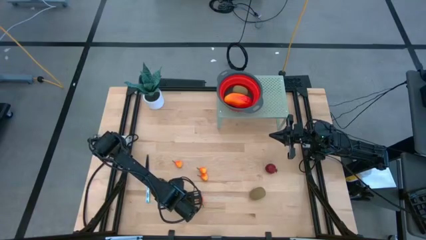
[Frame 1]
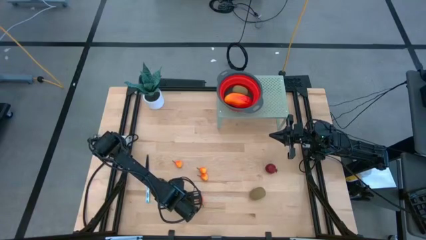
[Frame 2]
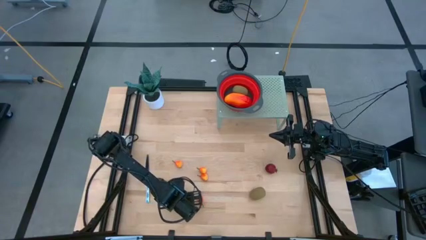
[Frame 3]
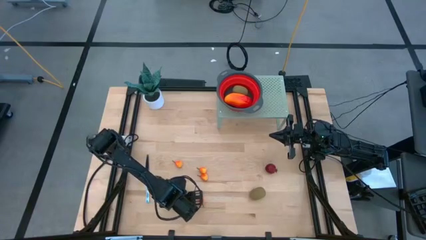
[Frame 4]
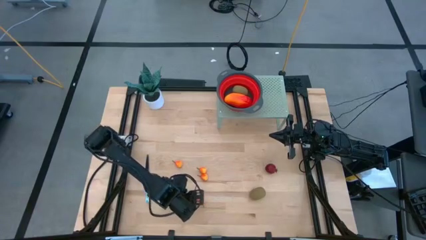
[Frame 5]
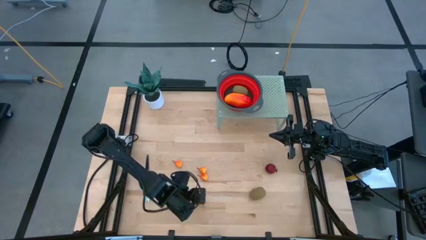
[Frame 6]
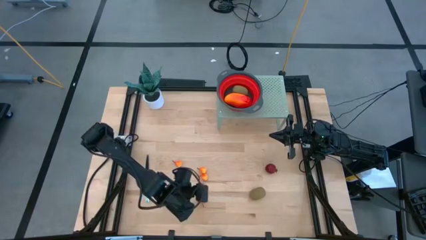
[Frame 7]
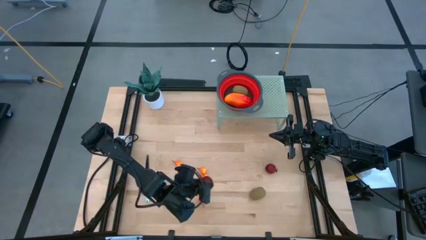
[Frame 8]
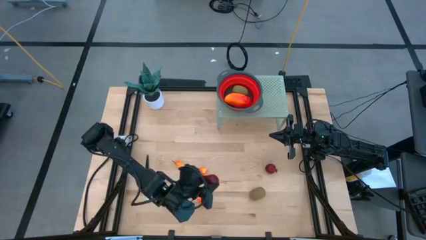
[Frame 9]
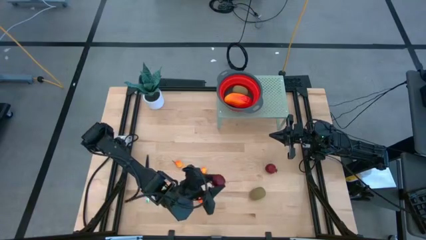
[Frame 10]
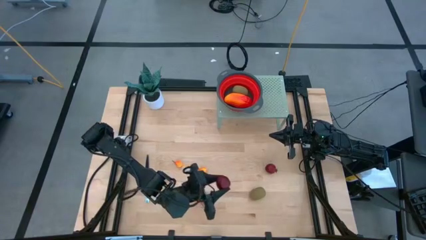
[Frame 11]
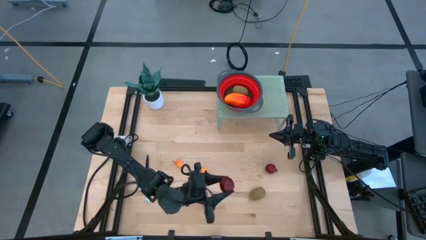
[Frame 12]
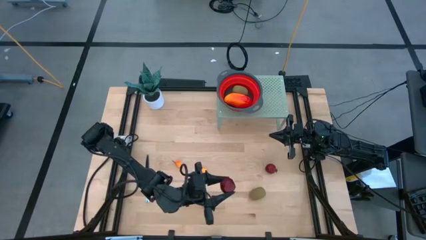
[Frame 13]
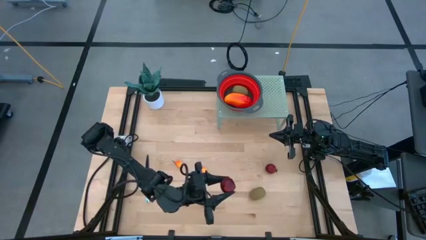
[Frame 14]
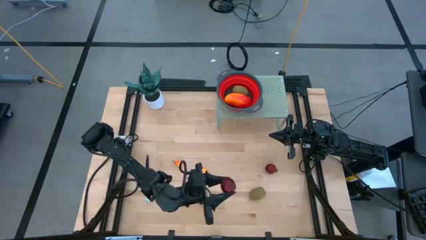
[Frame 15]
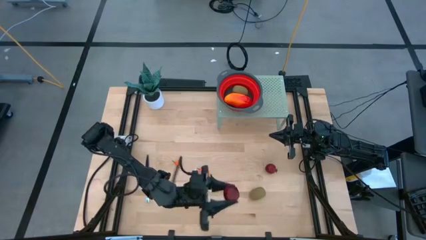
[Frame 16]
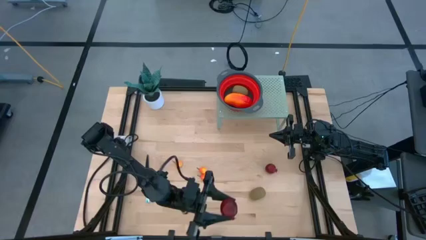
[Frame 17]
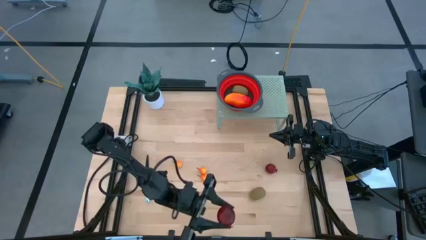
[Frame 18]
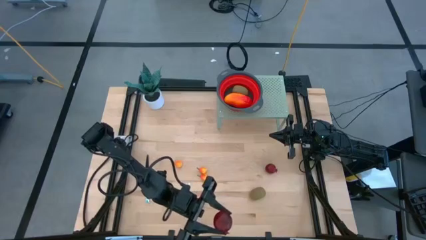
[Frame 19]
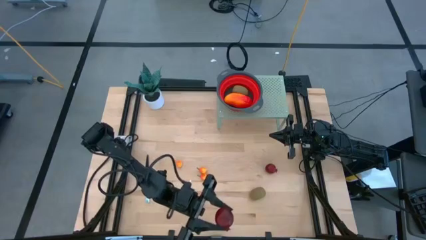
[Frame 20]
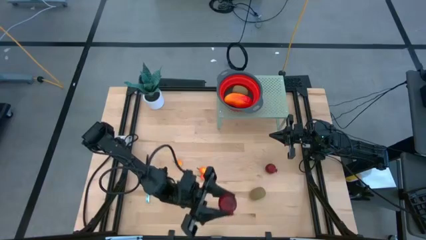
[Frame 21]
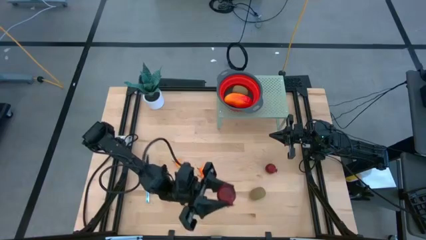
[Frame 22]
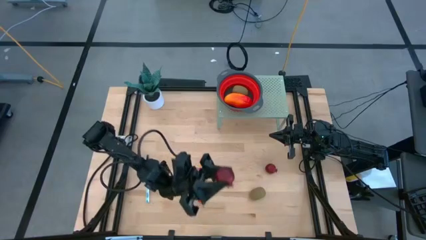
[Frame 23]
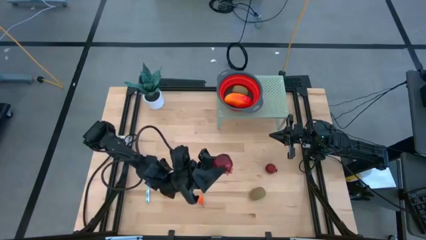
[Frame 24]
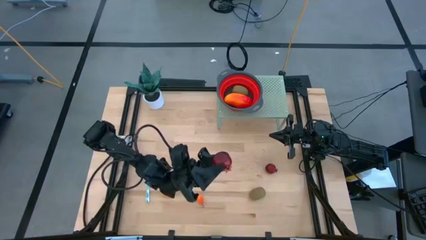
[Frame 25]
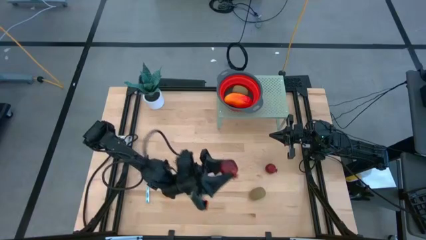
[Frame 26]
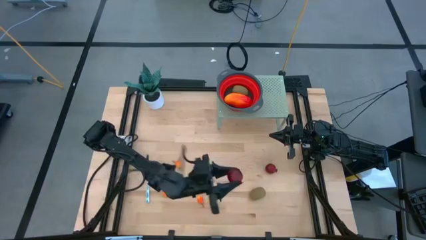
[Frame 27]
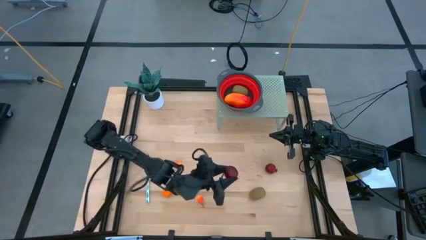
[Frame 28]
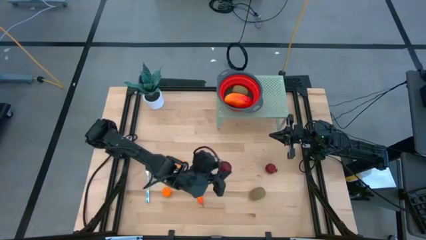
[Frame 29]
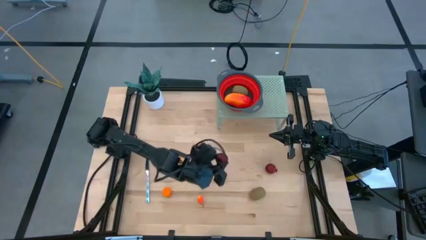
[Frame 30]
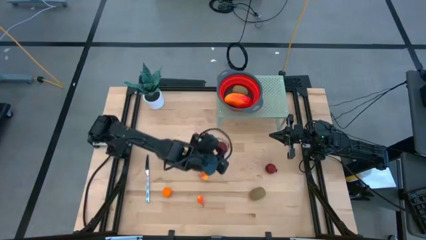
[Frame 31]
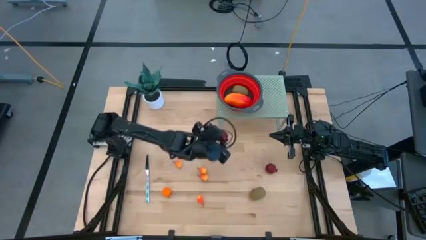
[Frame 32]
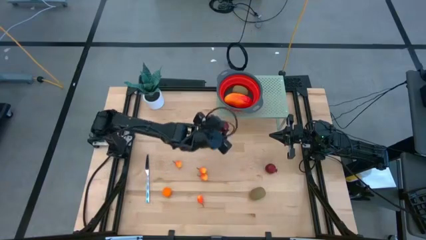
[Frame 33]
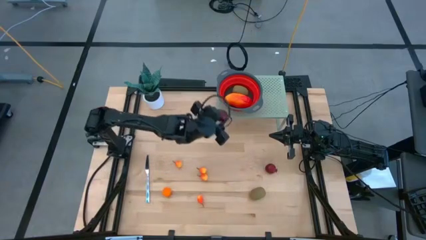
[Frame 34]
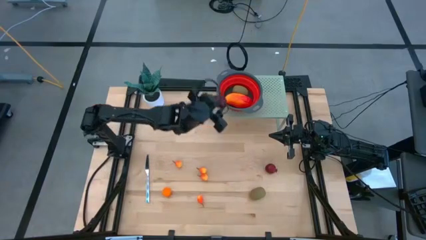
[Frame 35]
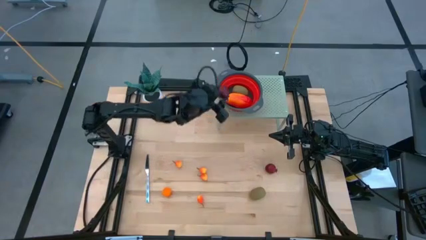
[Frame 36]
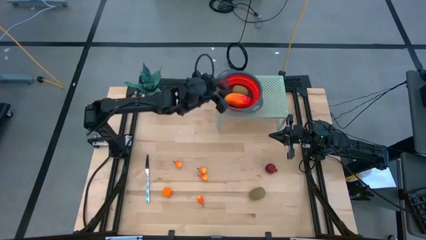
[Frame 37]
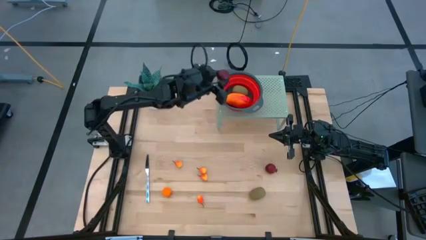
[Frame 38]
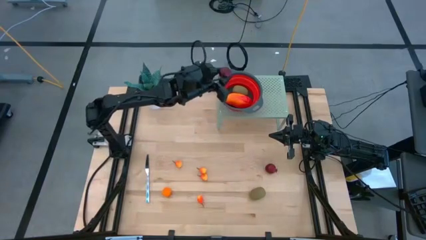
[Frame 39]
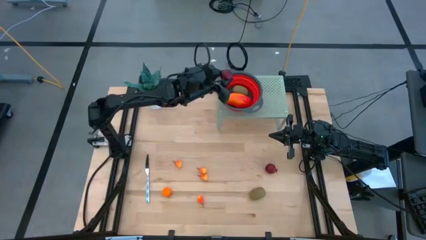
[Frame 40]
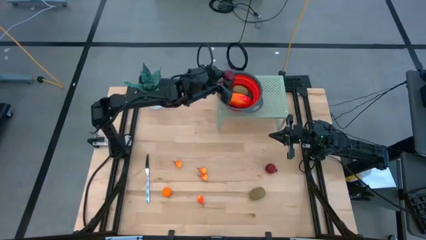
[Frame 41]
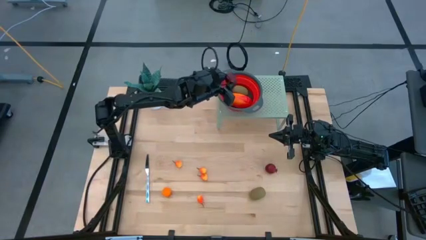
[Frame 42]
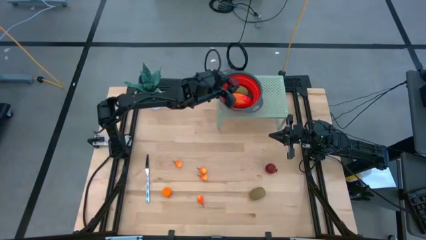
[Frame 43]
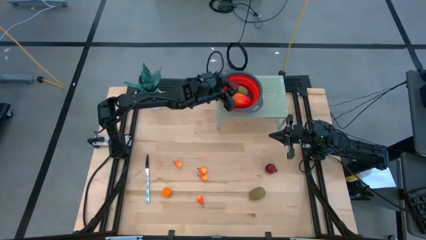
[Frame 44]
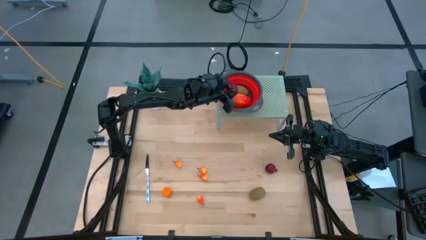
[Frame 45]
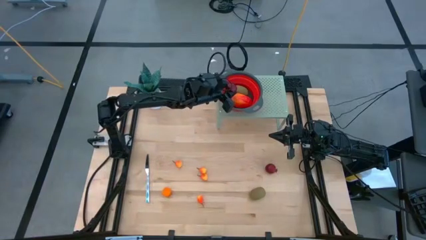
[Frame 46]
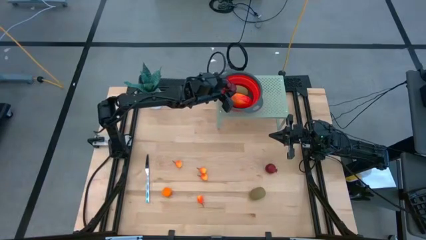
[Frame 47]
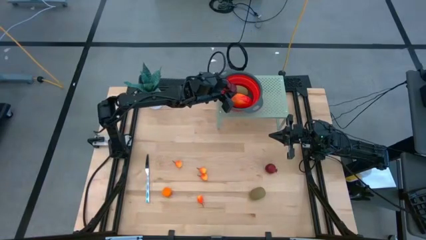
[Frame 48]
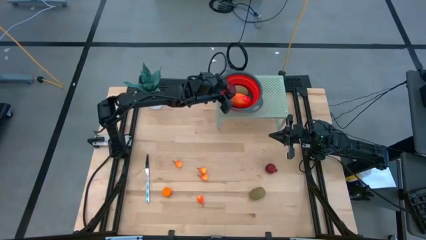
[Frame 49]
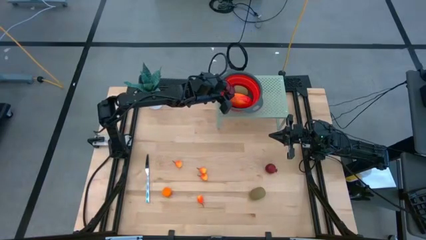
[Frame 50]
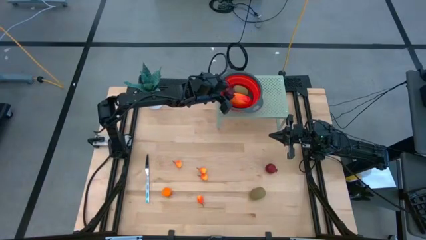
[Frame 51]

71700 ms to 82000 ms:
Task: Pick & Place Fruit
Put the top red pomegranate into the red strainer bowl on the shelf

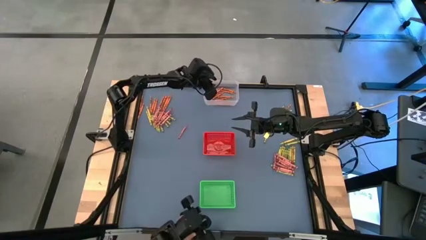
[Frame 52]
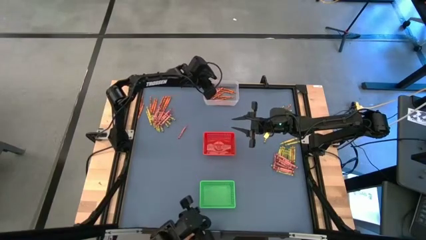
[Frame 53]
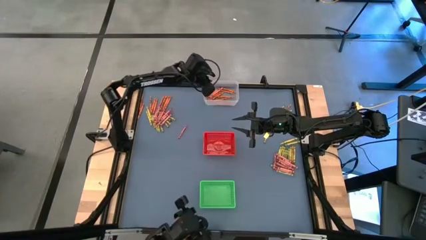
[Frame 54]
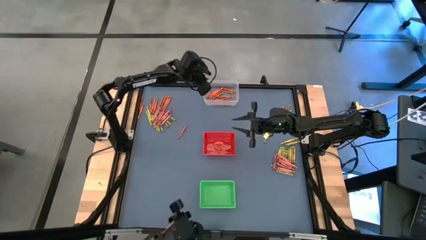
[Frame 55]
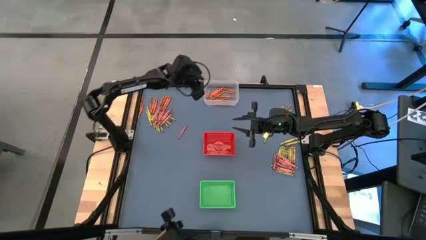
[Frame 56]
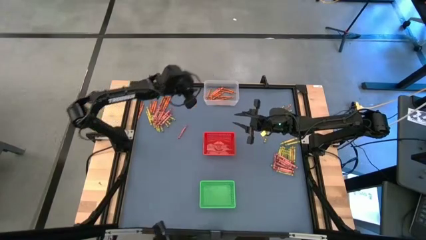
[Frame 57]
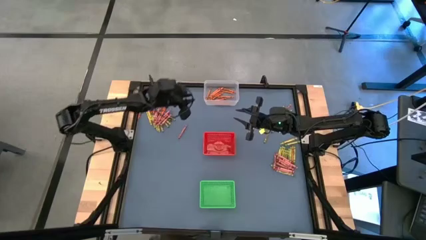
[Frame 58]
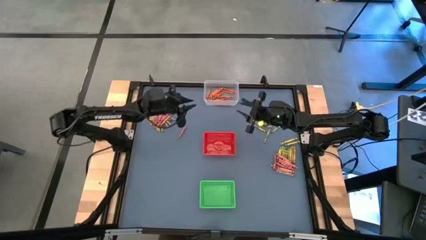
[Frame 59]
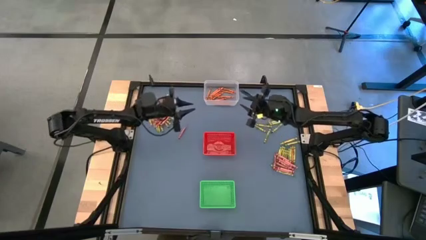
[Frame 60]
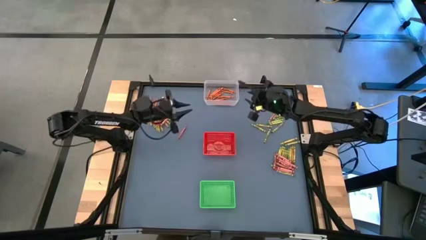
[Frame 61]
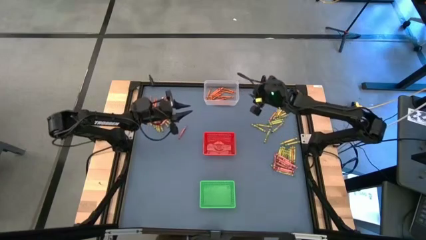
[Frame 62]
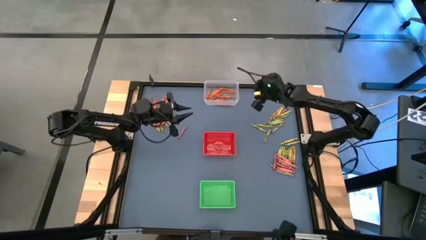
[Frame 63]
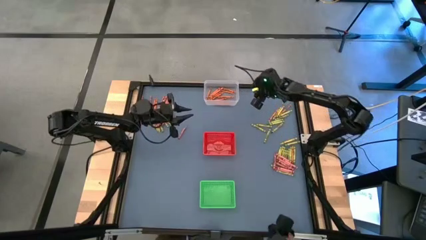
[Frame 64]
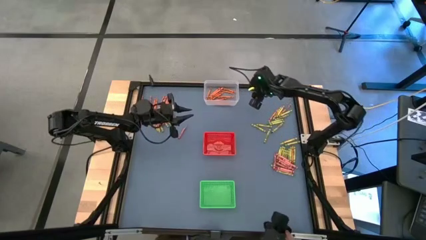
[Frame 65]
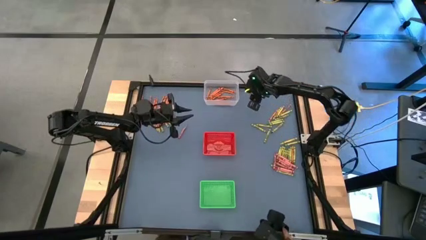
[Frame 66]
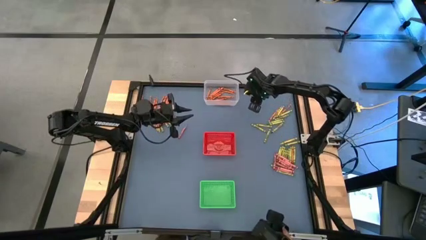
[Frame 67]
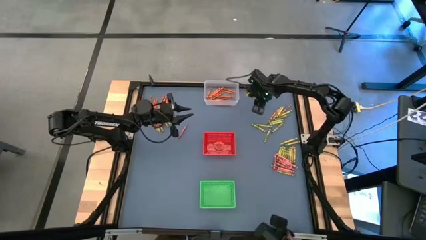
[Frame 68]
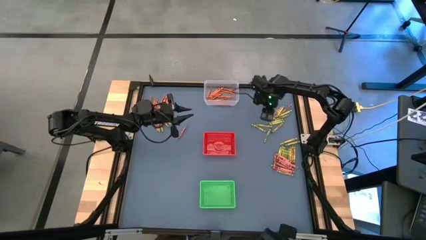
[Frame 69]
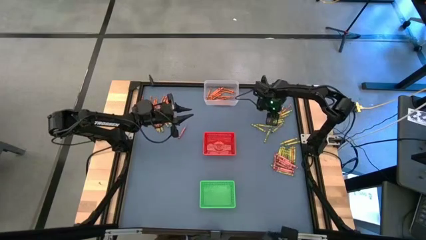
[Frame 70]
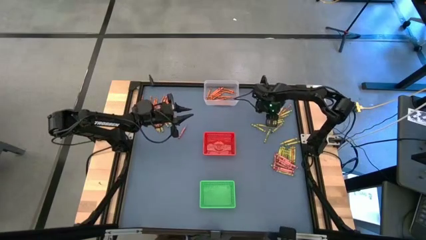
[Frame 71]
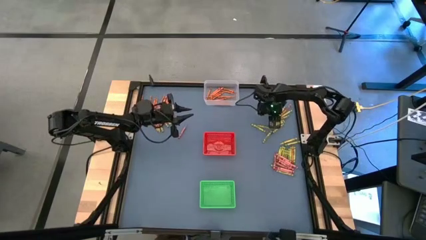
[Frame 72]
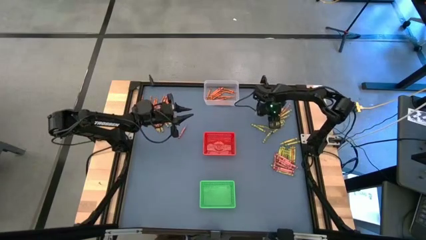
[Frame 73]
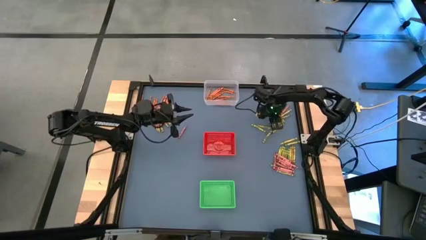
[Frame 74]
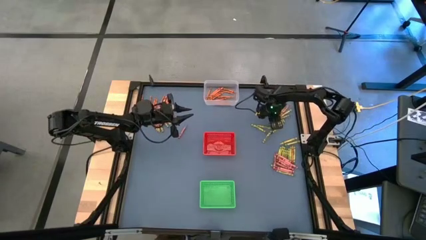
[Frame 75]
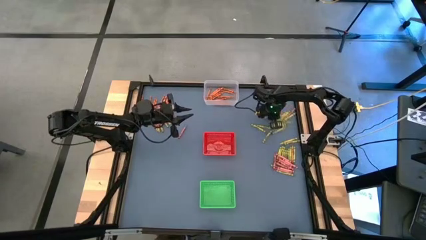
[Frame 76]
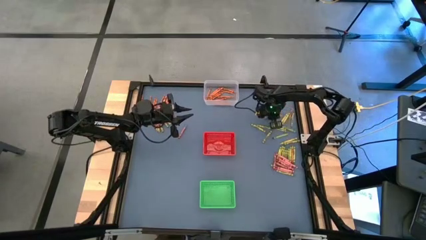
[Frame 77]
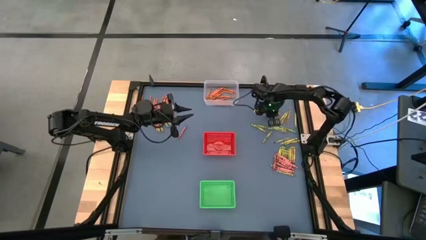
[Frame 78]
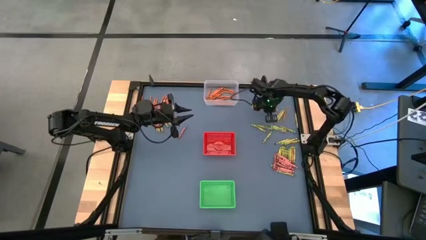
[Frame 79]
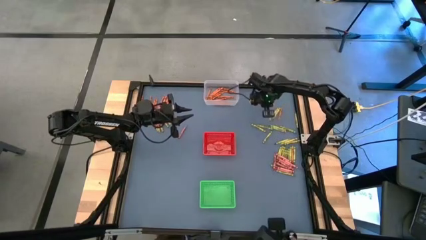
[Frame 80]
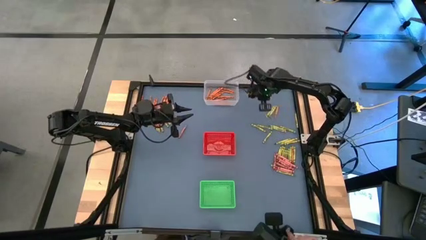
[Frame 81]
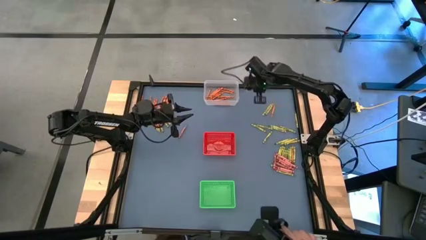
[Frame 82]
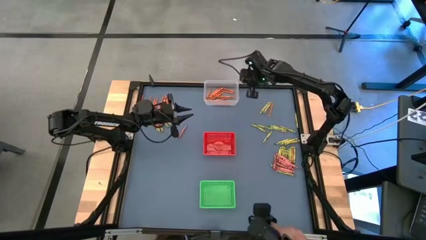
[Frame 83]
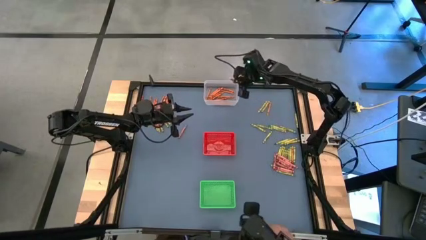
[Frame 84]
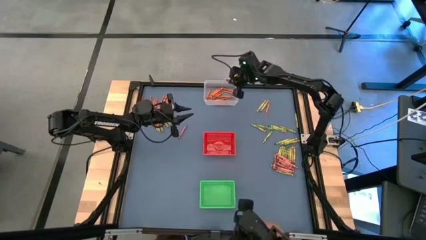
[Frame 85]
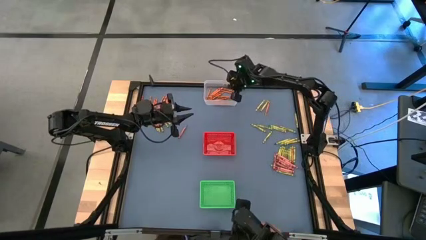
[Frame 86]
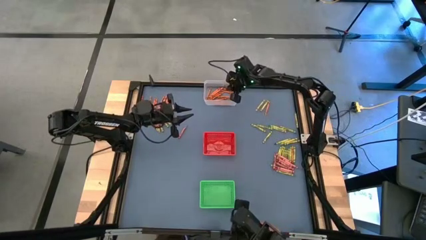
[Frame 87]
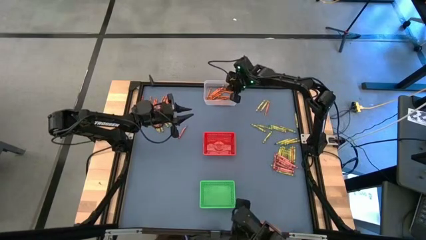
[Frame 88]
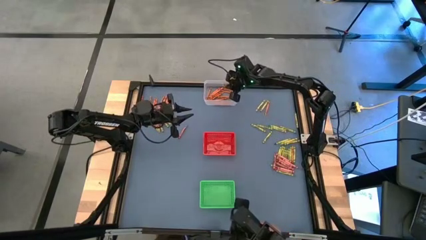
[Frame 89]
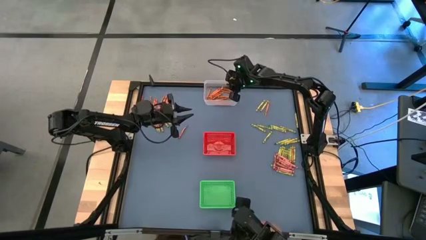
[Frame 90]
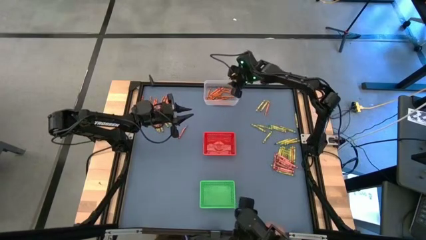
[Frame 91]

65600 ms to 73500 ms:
Task: Sort crayons
Put the orange crayon into the transparent bin
